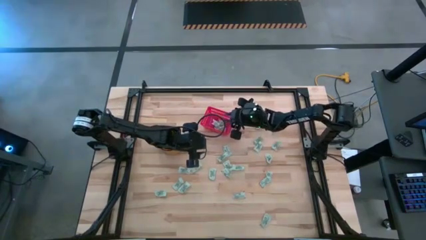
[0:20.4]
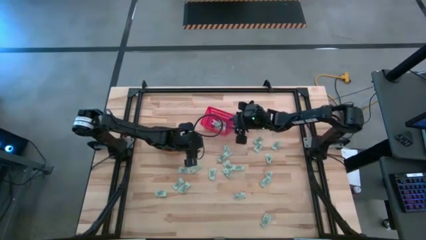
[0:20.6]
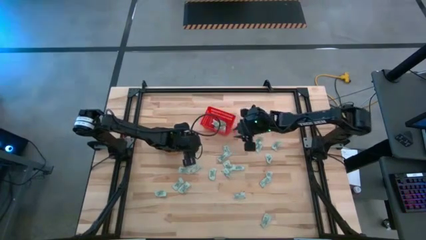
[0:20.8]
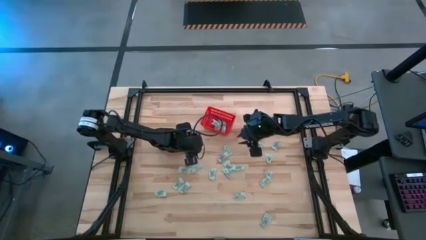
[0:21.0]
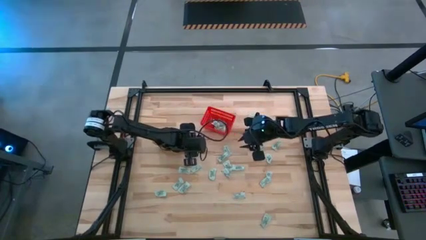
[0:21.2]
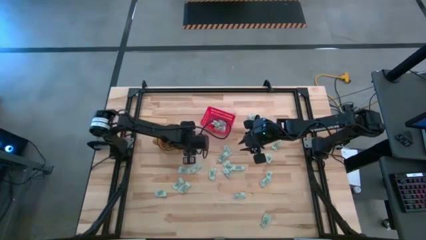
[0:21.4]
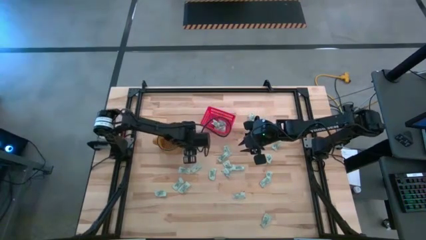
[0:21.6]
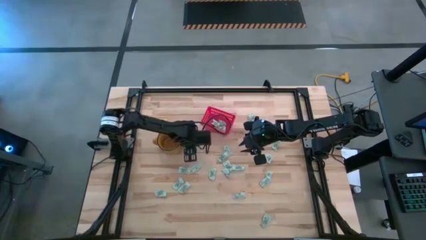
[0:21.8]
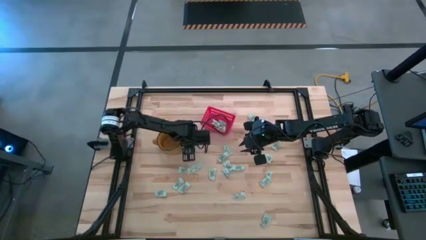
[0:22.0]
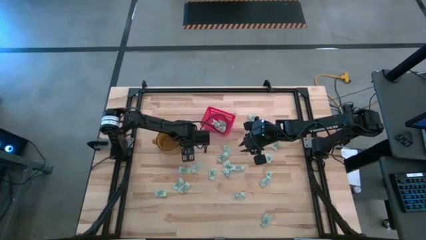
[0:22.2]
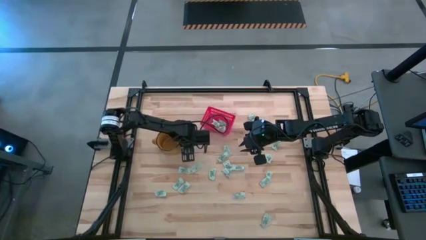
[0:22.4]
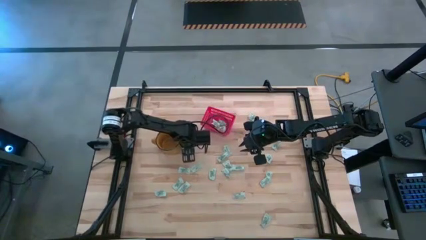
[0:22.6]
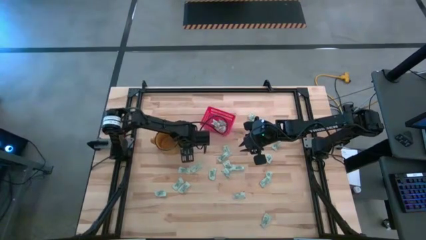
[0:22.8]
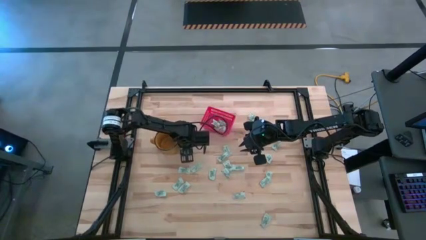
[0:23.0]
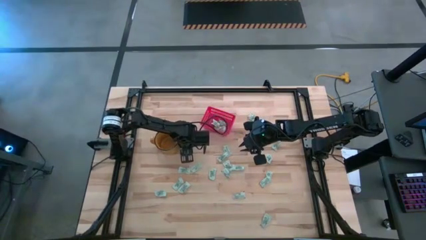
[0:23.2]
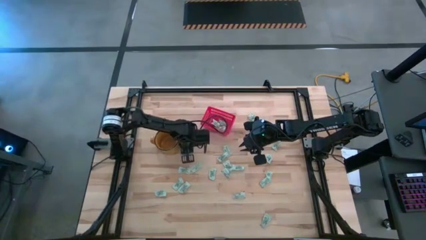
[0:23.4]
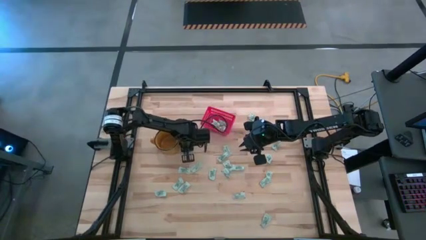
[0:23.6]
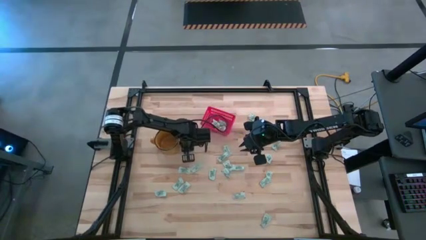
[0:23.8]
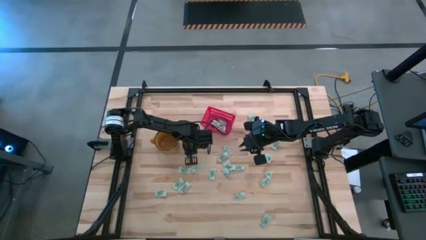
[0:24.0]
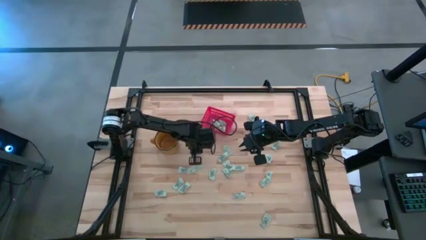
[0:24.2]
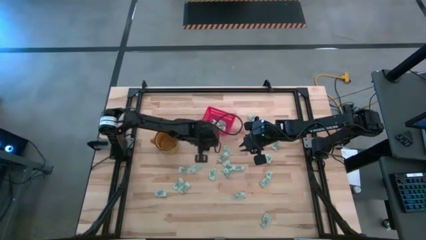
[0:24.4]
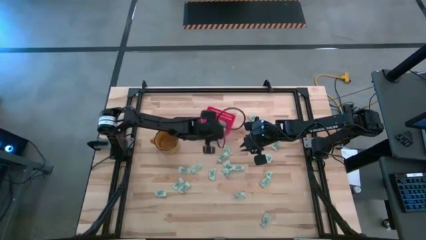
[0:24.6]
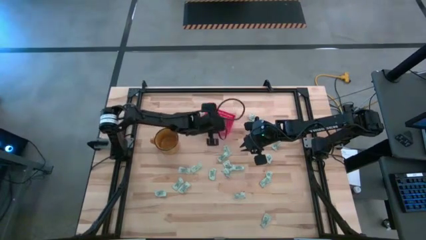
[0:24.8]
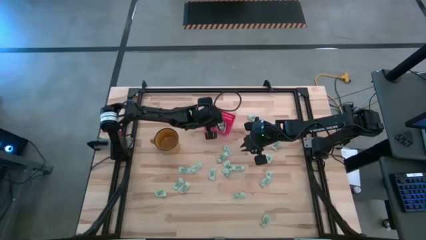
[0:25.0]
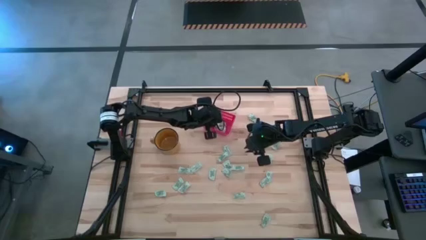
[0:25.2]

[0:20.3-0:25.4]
Task: Pick and place Stevia / Truvia into bins
Put the stevia packet into the red basket

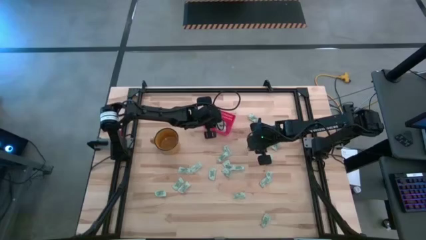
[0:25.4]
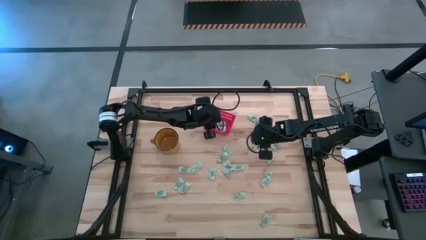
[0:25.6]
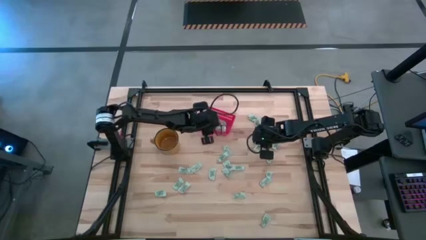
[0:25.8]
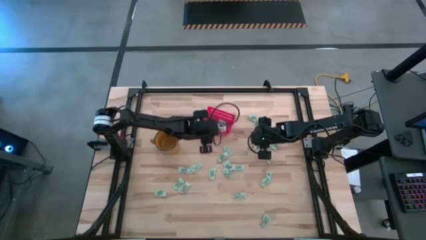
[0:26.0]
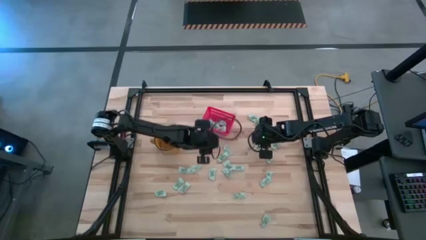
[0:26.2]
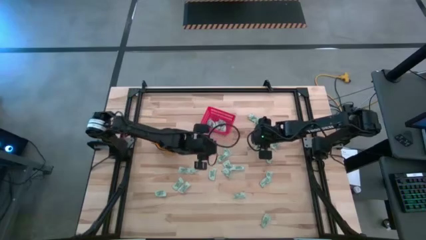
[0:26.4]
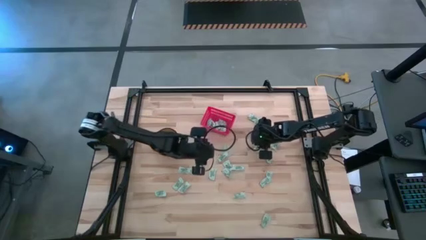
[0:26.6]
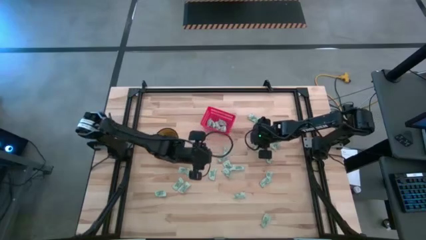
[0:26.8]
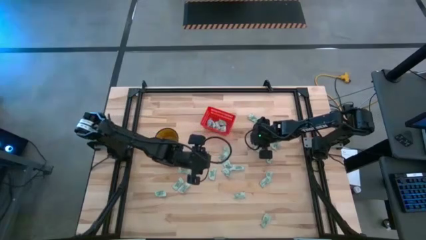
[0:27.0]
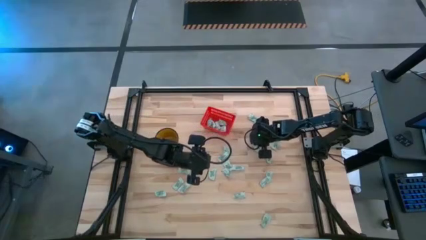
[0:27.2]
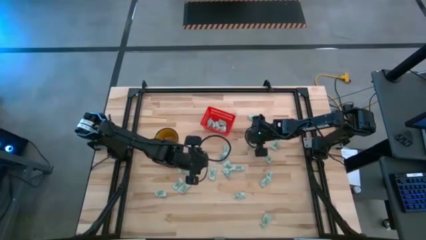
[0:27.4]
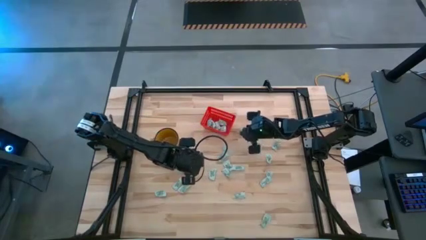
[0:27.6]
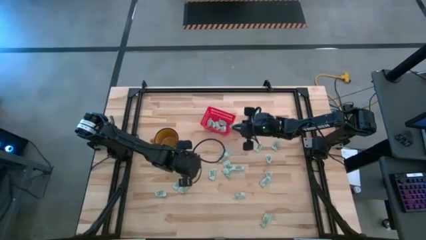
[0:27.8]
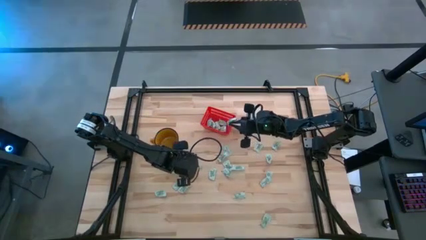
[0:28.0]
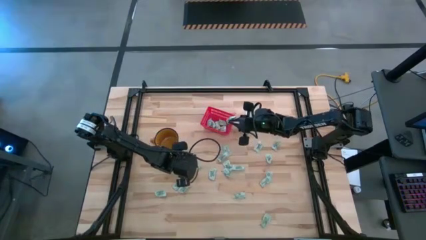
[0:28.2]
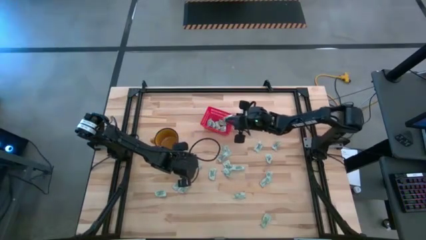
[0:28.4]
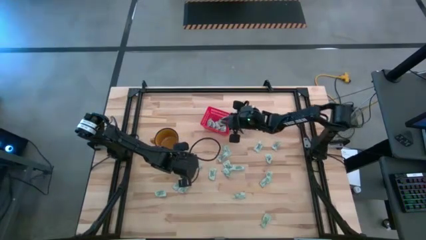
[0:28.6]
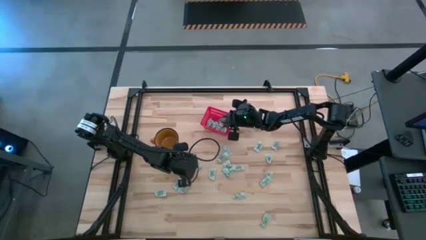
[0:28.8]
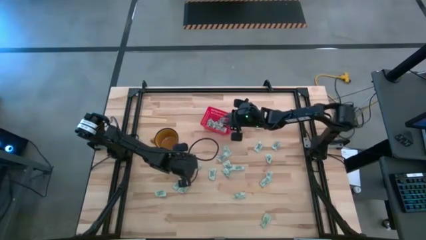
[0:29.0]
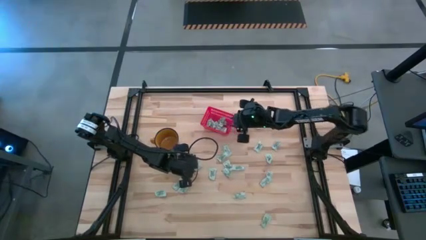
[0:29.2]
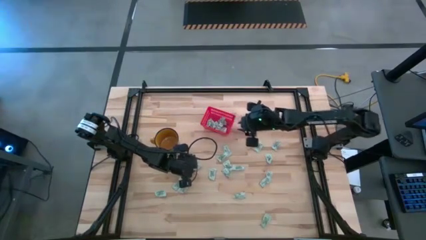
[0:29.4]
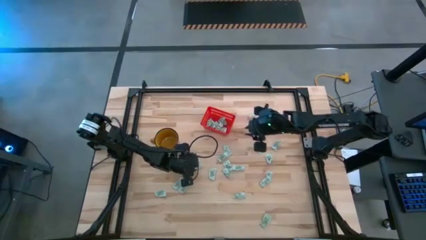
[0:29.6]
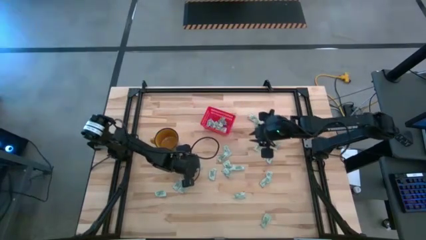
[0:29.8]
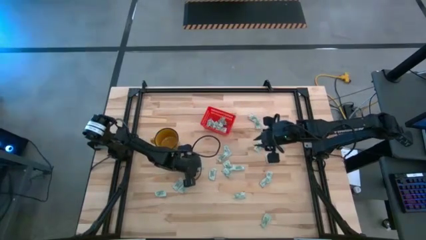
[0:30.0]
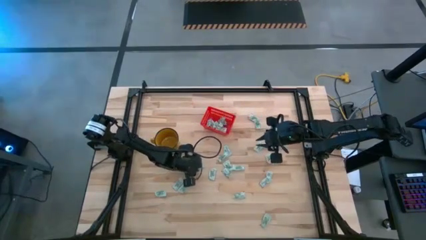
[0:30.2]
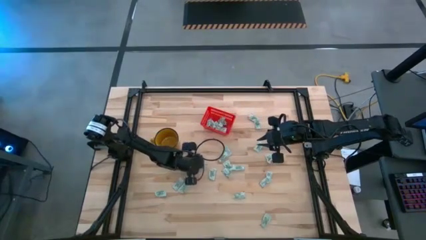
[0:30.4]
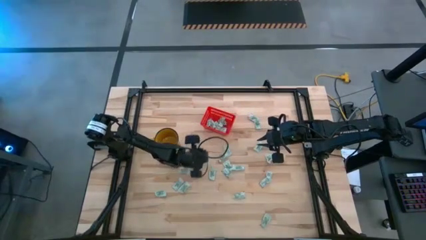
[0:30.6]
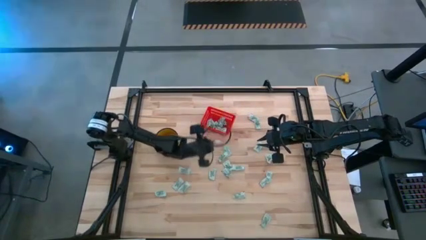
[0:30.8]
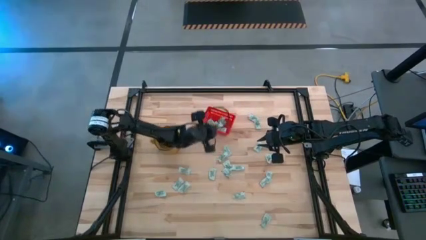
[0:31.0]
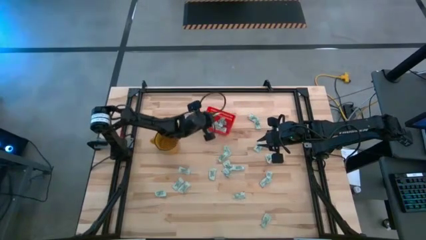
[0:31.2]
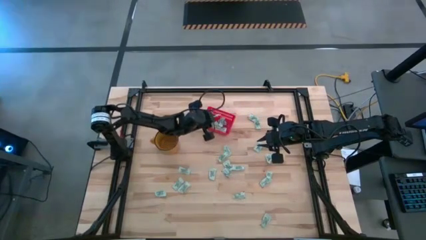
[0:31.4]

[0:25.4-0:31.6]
Put the stevia packet into the red basket

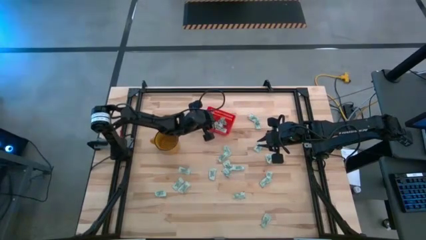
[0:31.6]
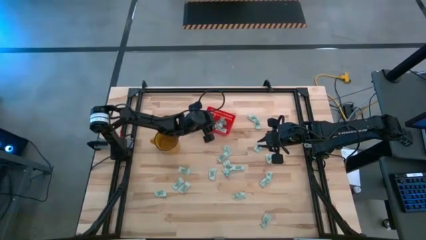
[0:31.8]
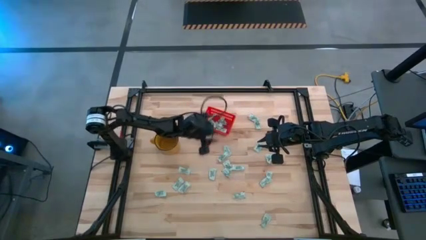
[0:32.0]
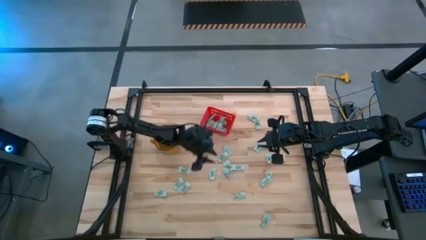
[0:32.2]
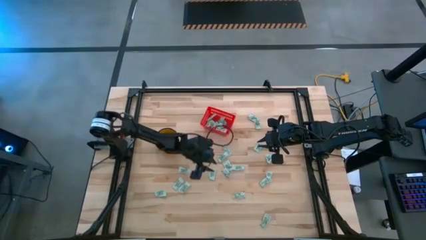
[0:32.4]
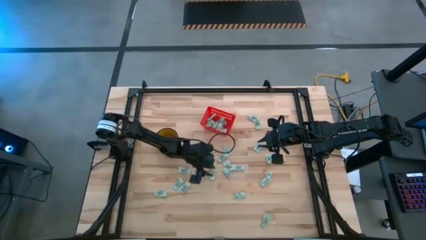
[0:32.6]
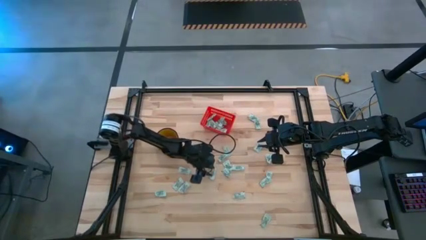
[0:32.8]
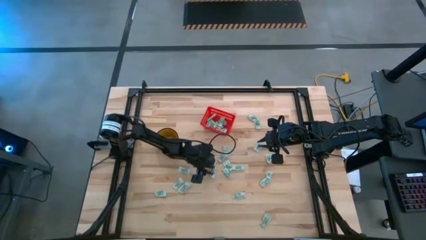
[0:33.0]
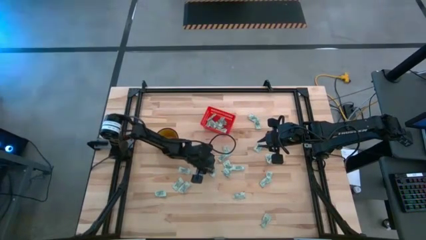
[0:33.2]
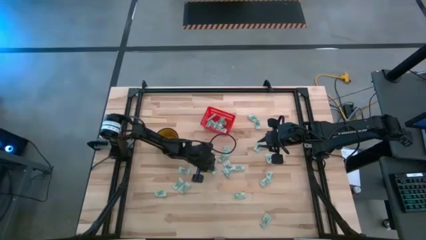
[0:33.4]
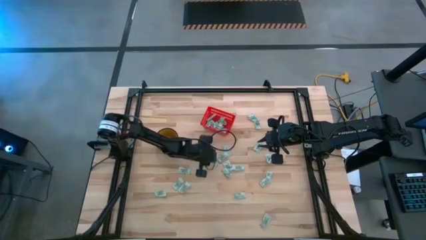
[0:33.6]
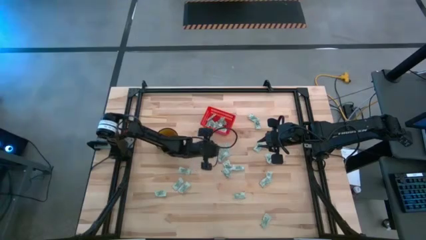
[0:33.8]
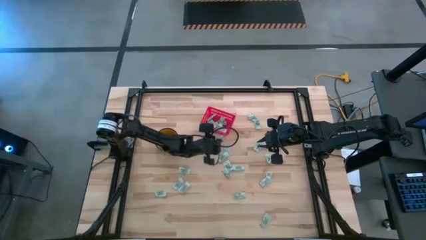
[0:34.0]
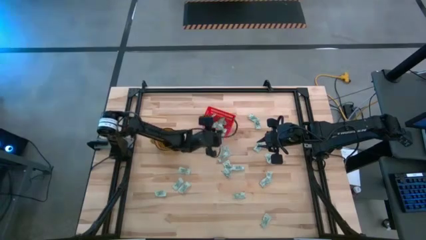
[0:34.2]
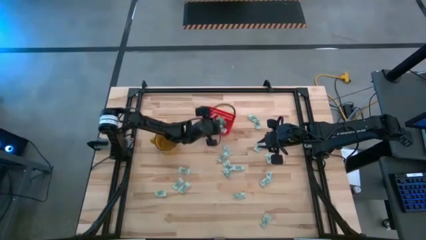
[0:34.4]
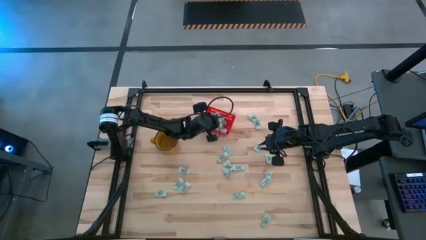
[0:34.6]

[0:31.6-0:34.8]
Put the stevia packet into the red basket

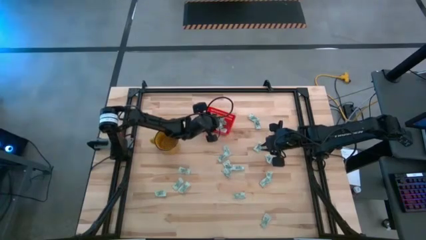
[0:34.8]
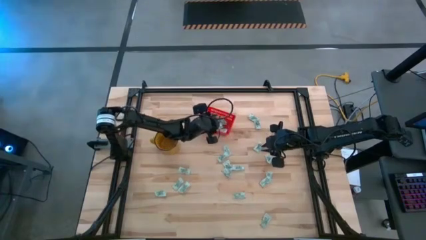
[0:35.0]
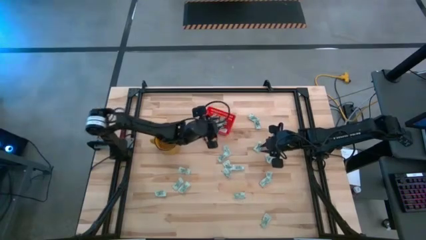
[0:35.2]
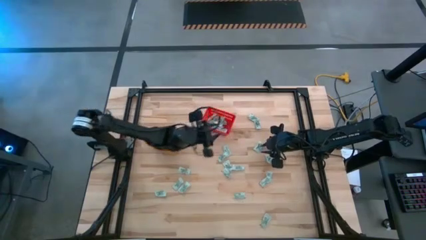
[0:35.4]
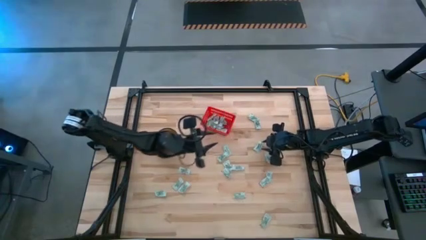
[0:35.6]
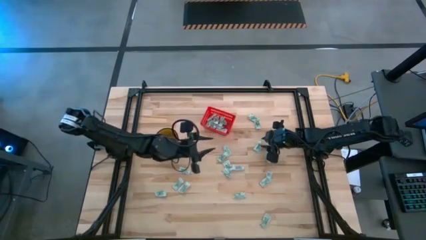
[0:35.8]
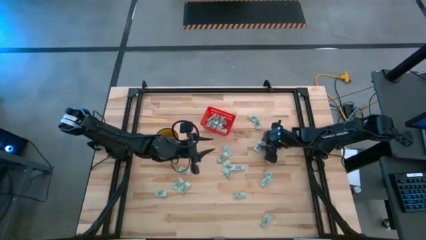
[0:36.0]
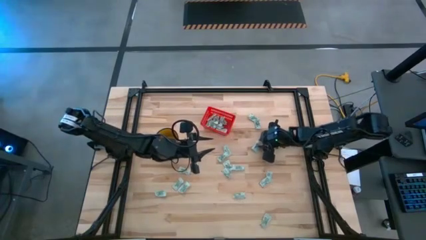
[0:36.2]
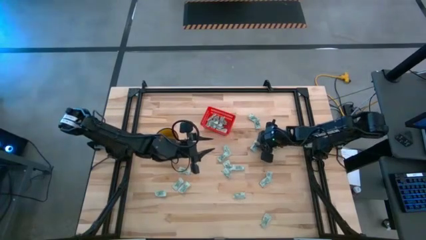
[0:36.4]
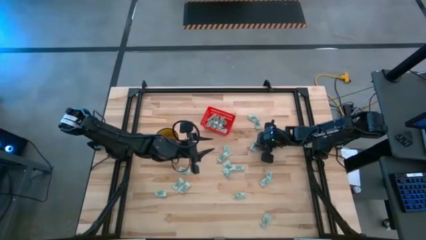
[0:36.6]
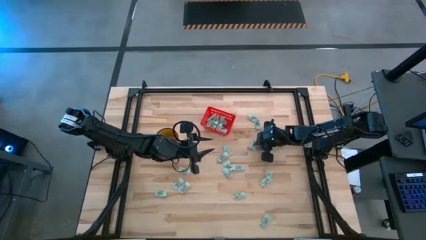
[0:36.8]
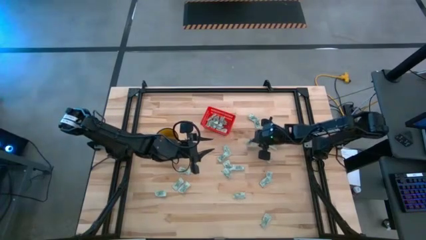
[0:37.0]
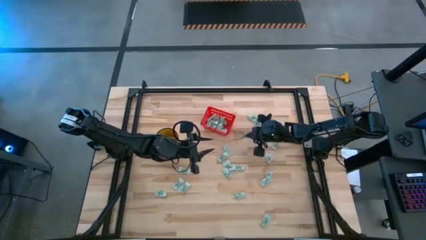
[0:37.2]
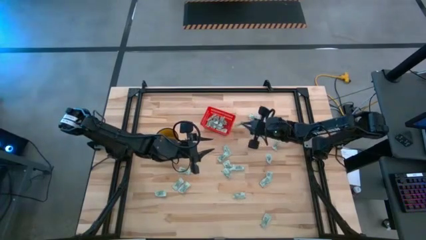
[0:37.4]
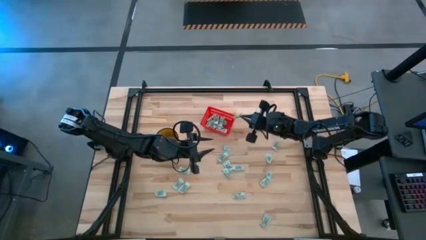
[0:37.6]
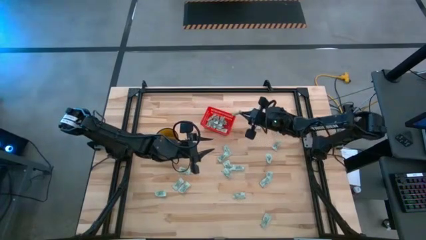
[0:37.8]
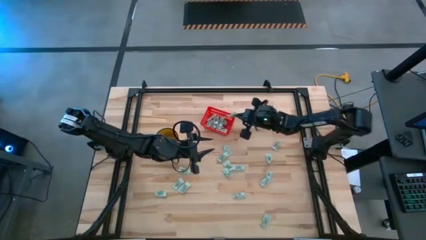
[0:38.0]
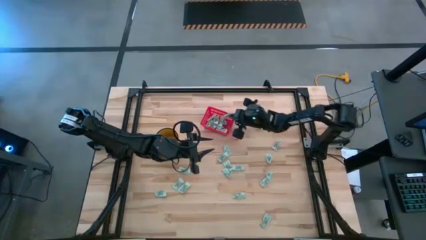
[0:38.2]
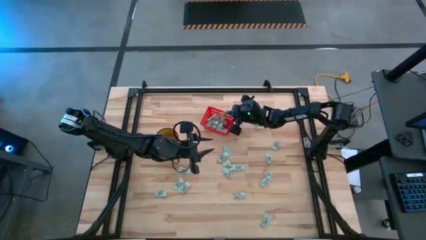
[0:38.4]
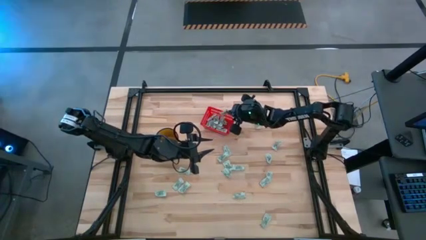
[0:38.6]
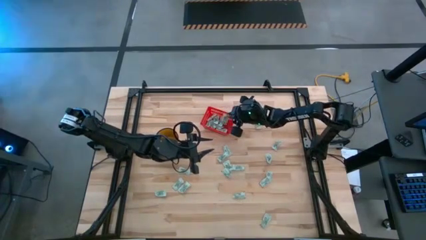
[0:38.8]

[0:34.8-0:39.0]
Put the stevia packet into the red basket
